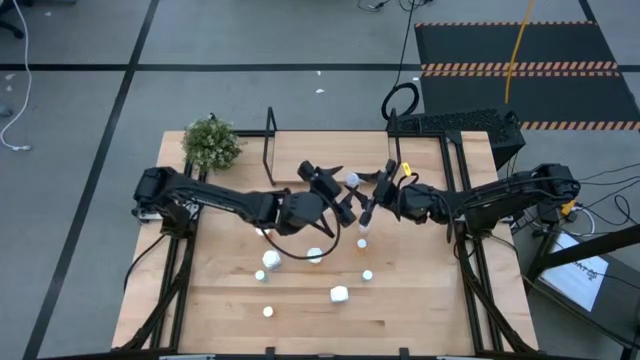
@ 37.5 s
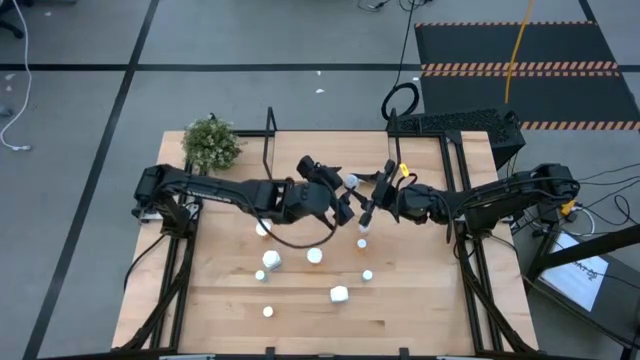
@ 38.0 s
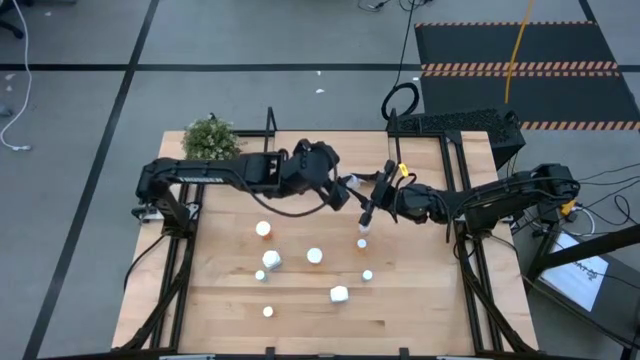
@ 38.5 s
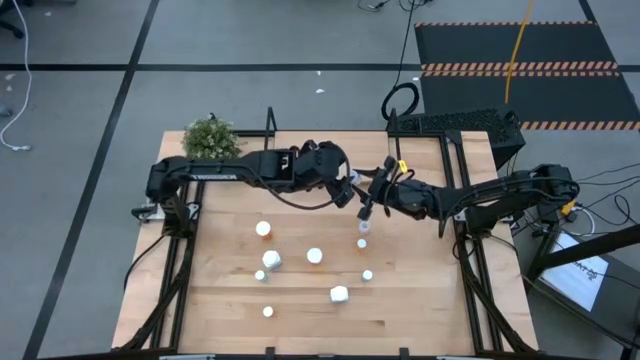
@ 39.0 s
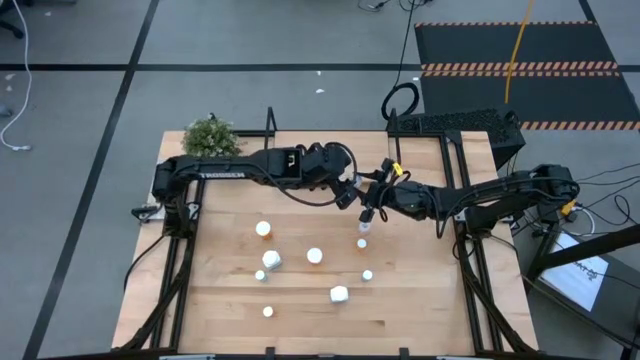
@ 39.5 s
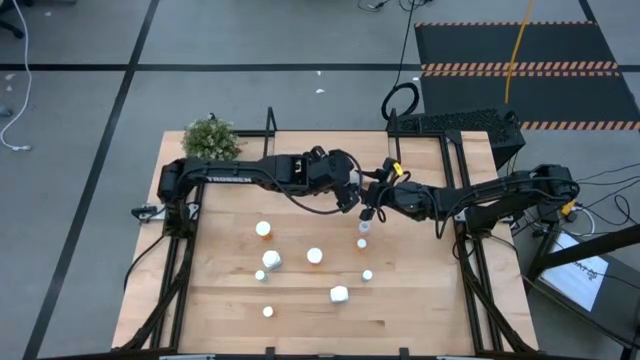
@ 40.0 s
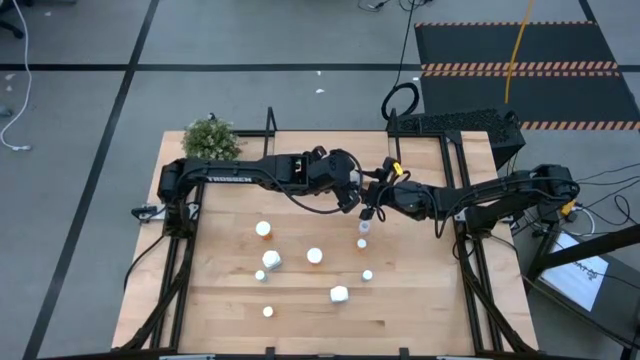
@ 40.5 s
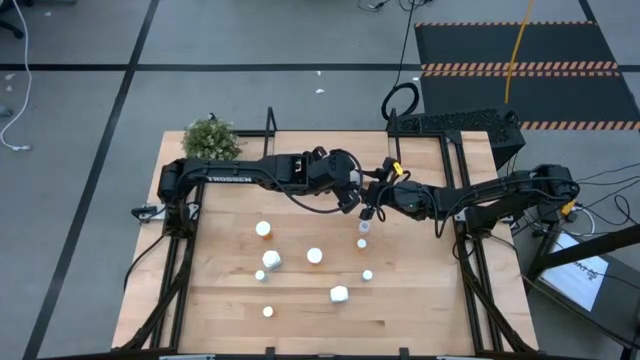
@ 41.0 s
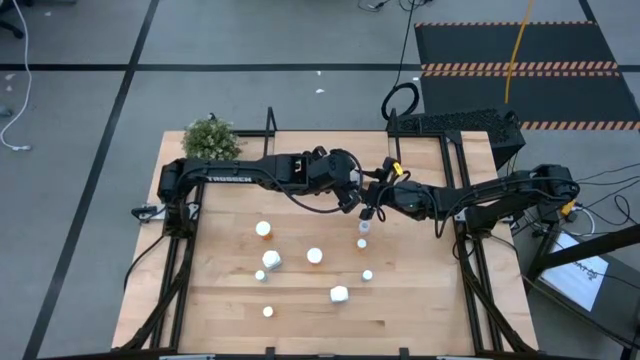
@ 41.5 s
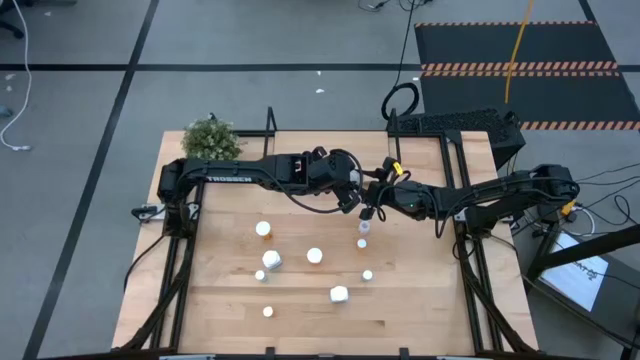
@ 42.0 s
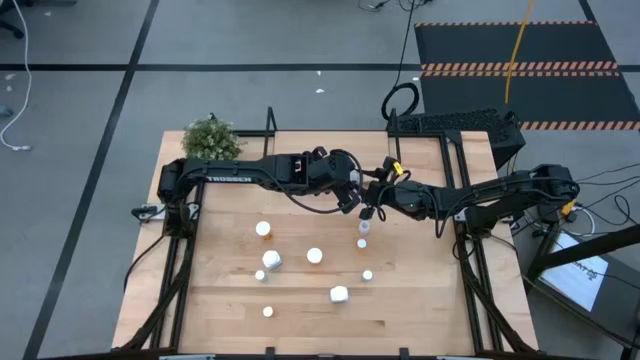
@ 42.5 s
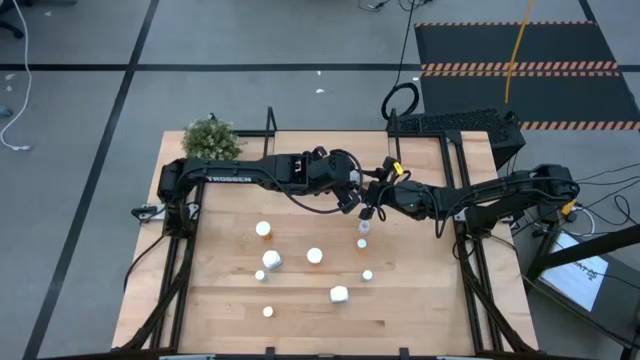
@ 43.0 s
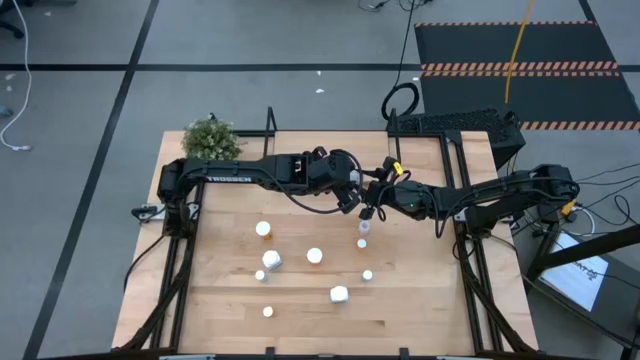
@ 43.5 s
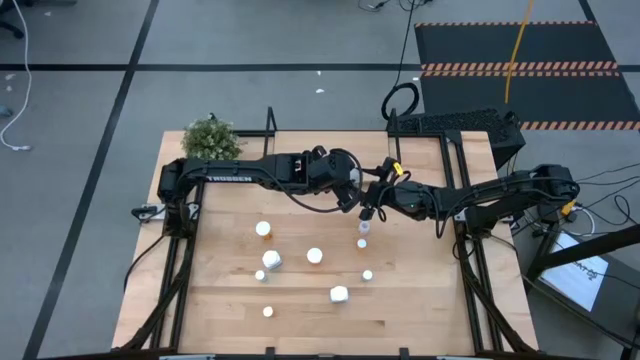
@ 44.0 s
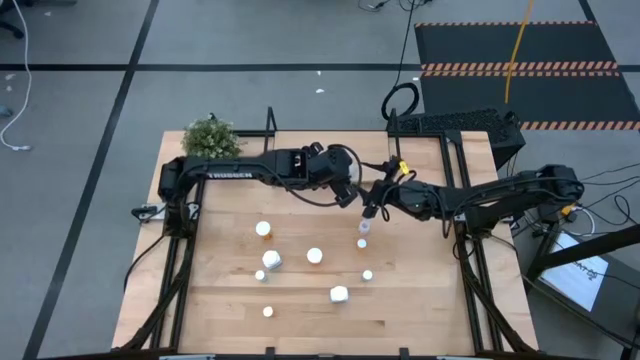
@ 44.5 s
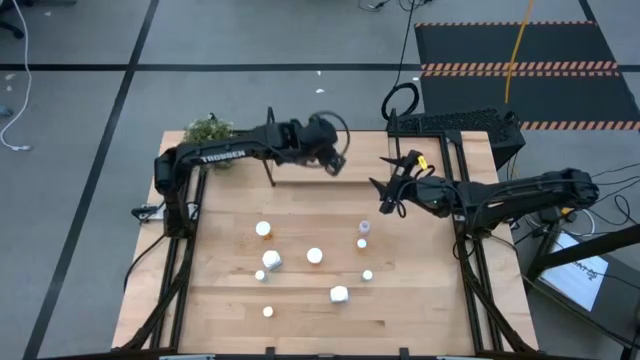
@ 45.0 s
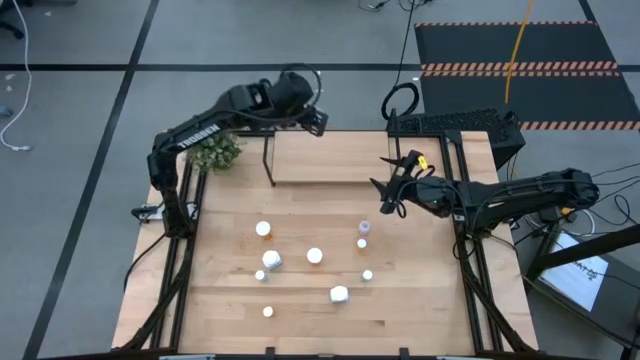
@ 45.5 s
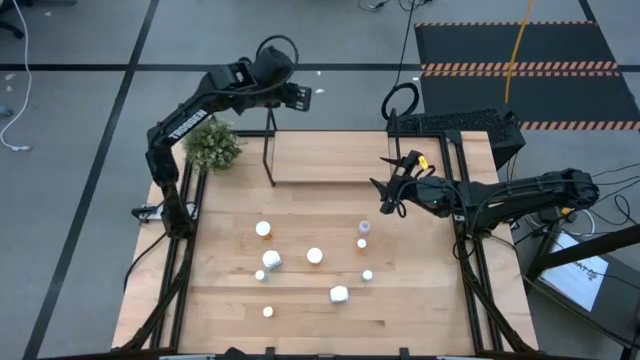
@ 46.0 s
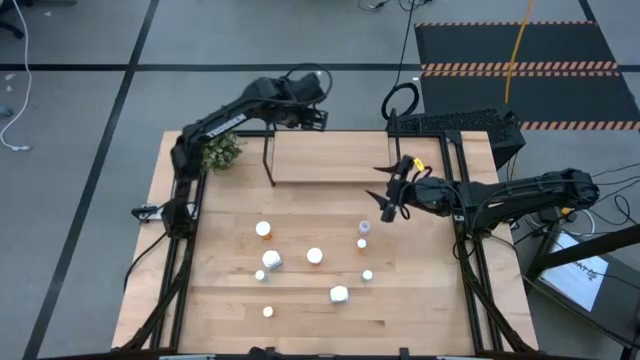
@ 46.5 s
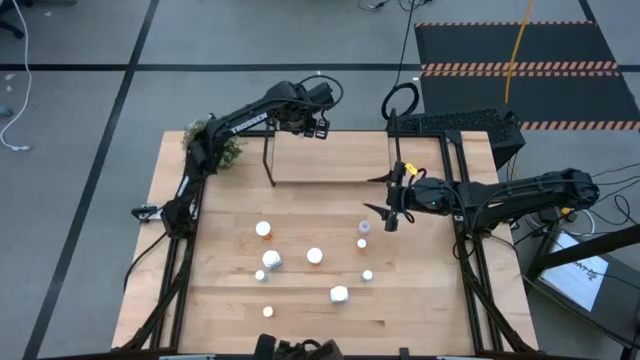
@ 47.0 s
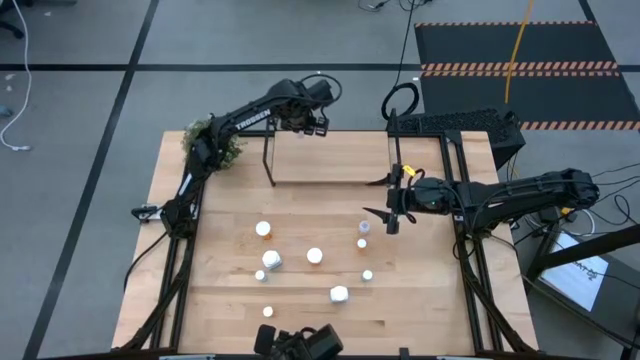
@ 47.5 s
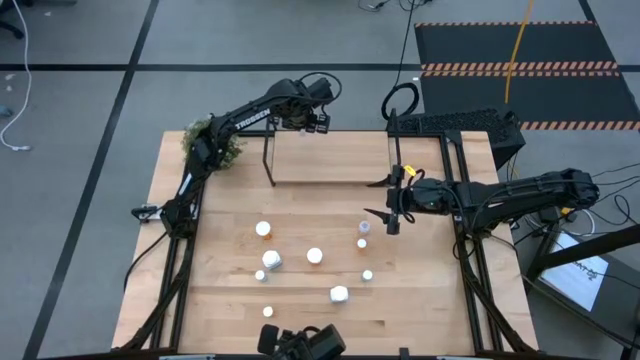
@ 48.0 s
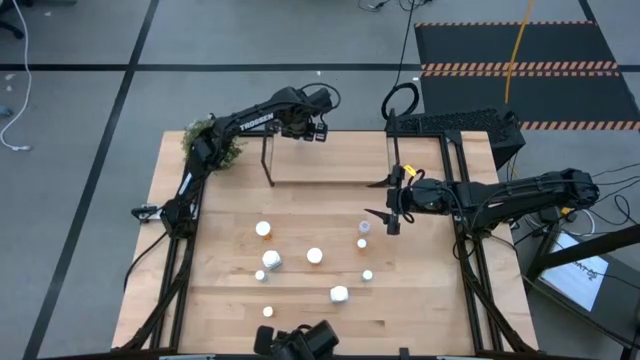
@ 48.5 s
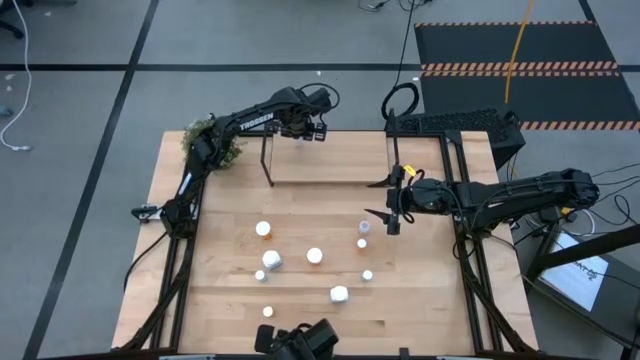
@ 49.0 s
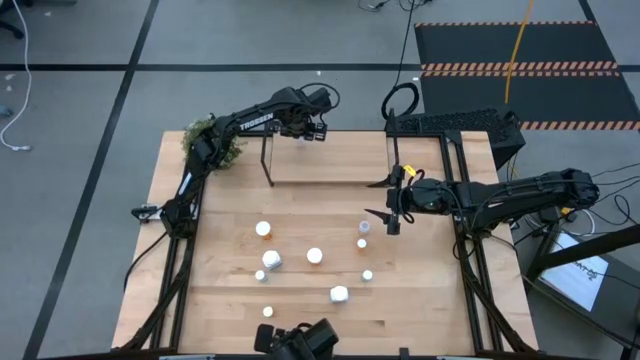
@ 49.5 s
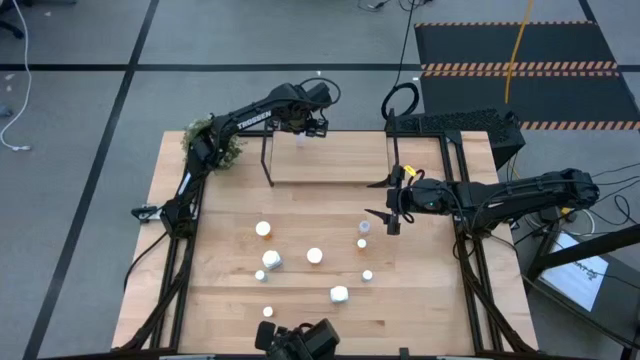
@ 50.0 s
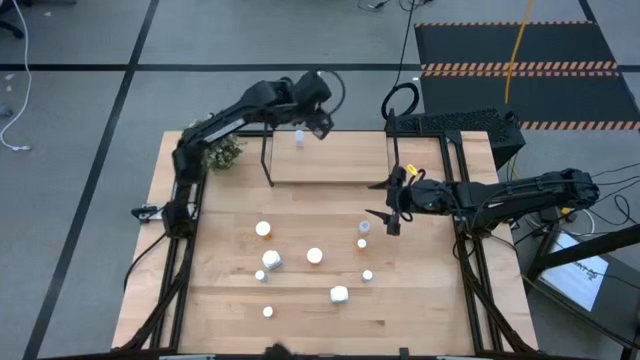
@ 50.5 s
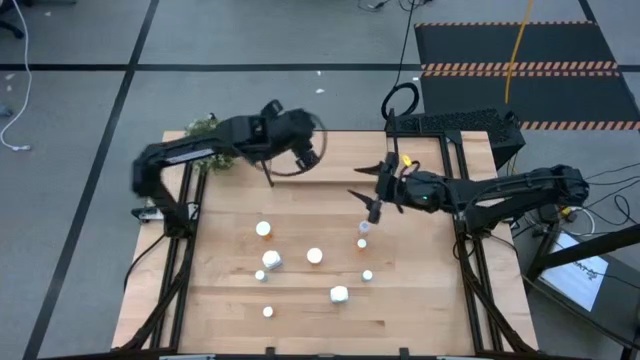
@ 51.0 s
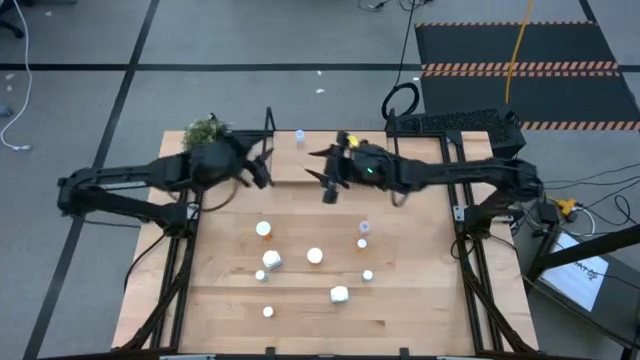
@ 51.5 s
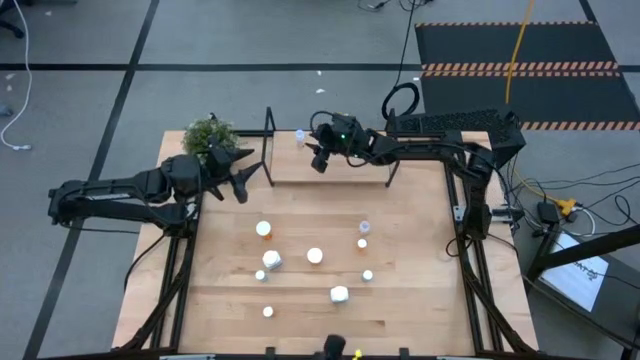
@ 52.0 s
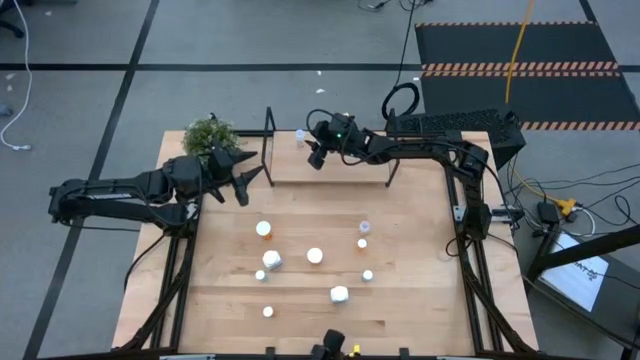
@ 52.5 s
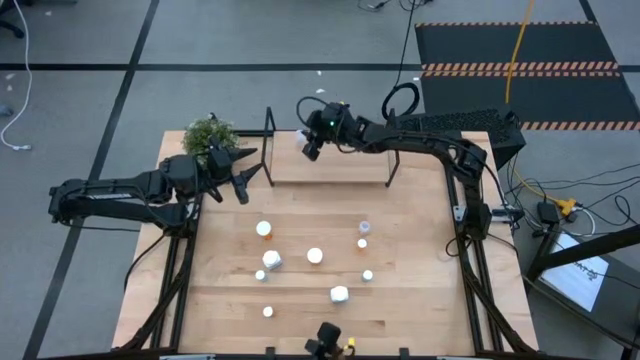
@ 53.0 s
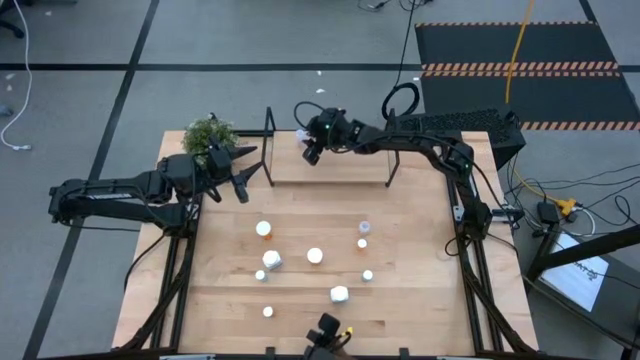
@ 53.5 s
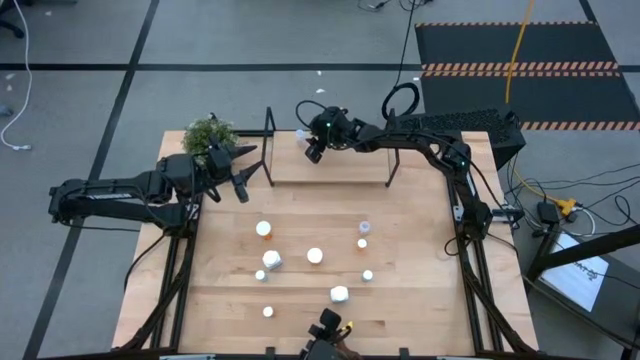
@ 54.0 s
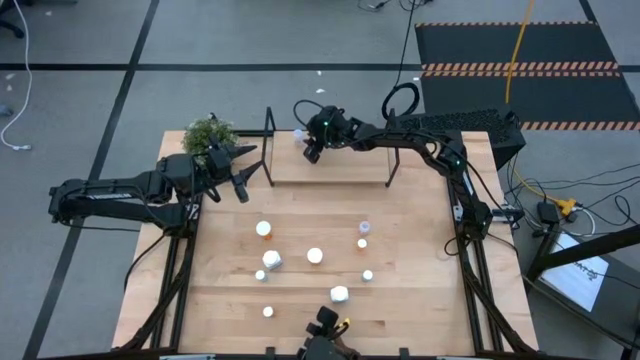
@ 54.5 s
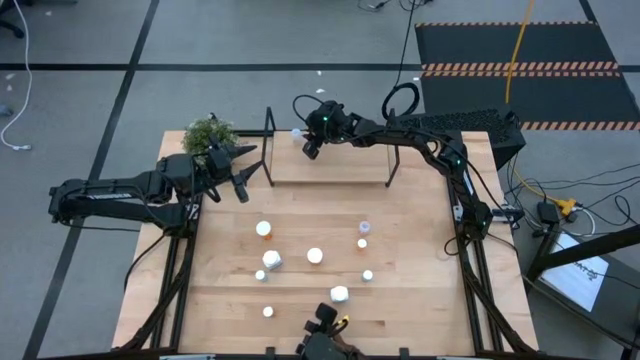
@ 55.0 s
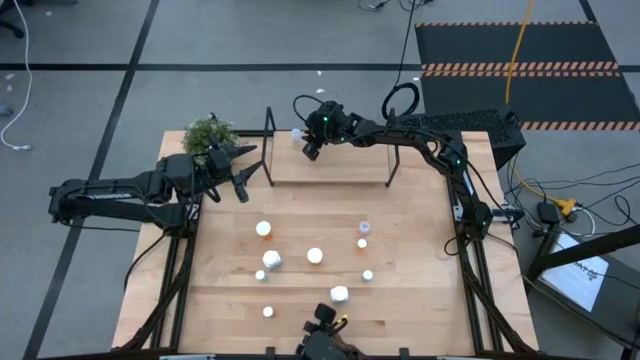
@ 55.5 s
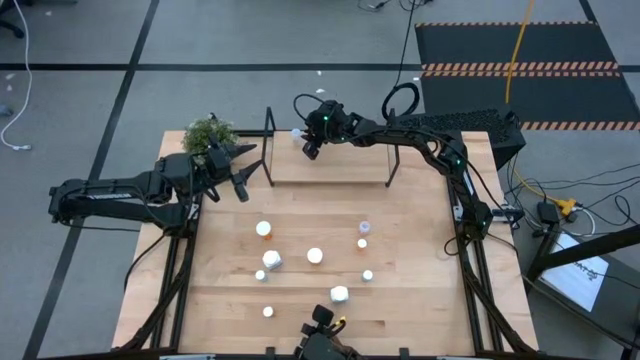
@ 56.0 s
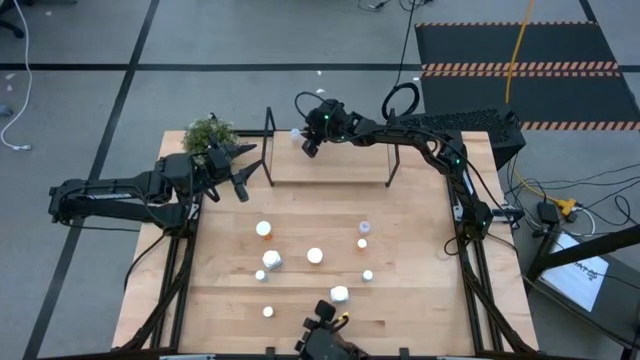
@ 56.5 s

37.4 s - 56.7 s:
Task: Pick and place medicine bottles onto shelf by color
Put the left transparent pill bottle on the shelf

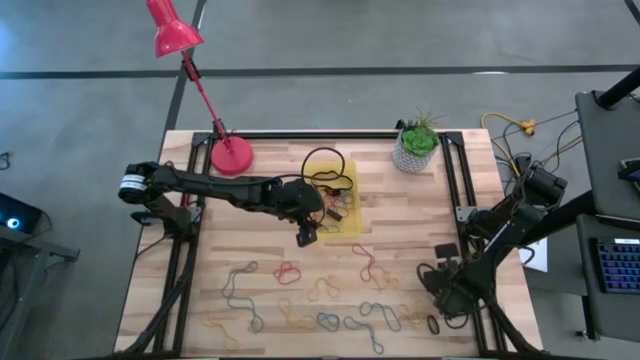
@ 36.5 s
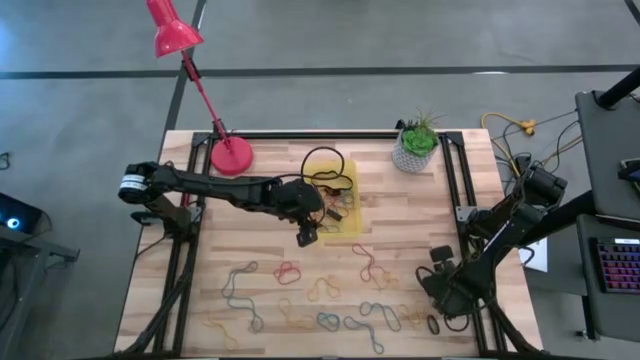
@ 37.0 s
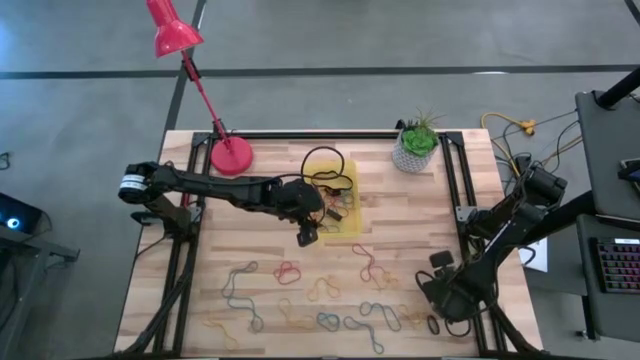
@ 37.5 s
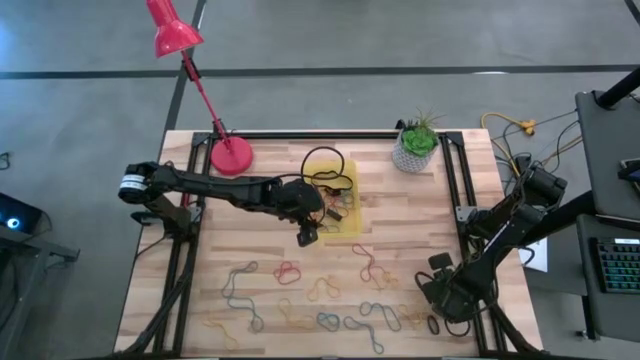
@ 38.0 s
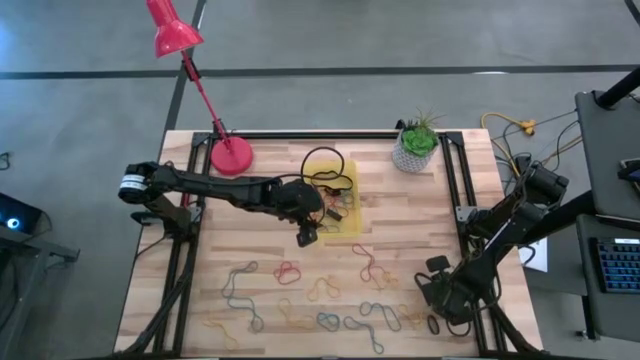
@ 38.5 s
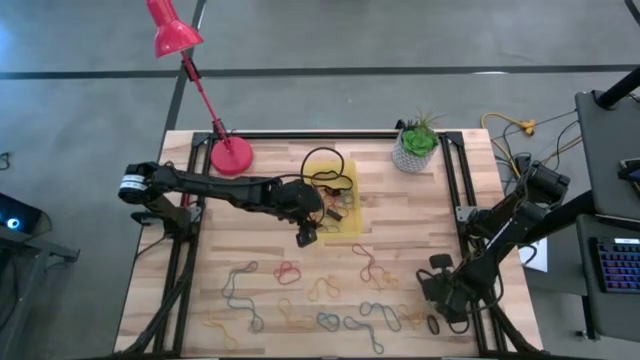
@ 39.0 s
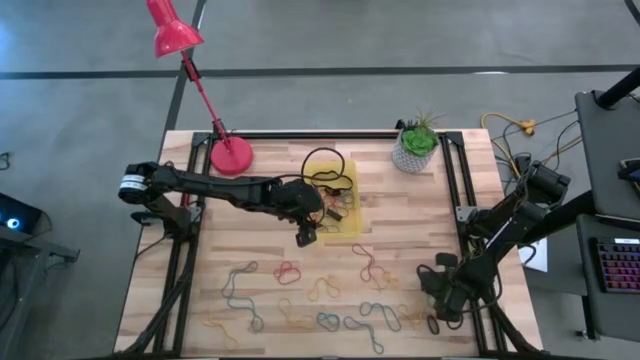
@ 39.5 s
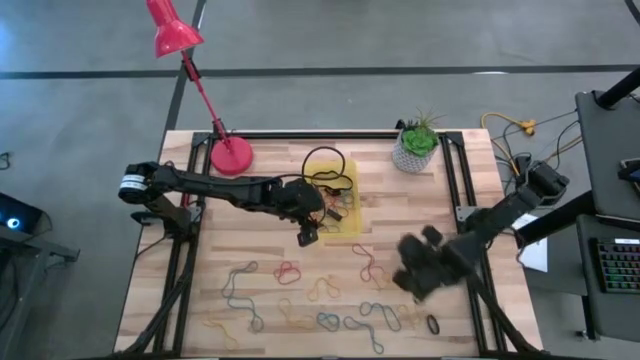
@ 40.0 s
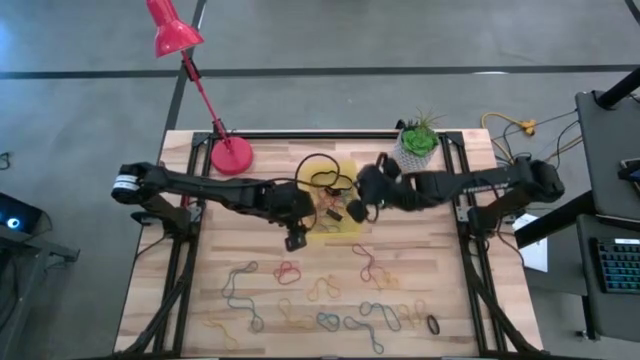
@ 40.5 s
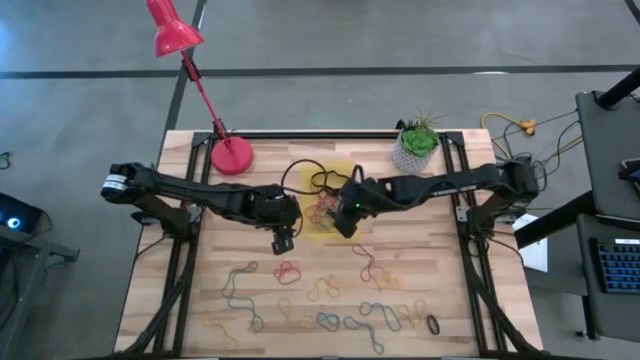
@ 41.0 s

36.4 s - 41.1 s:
Task: Pick and place rubber bands into bin
Put the blue rubber band into the yellow bin
